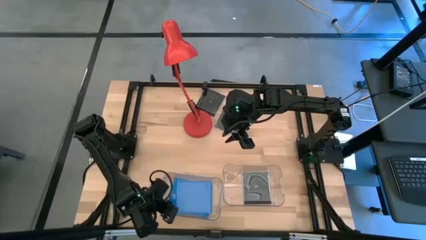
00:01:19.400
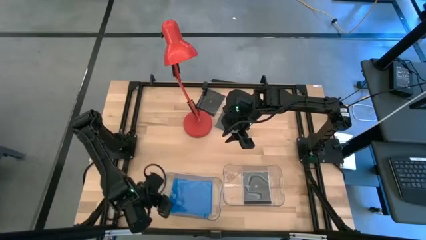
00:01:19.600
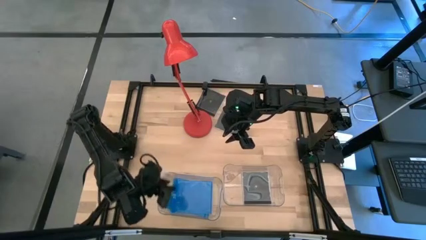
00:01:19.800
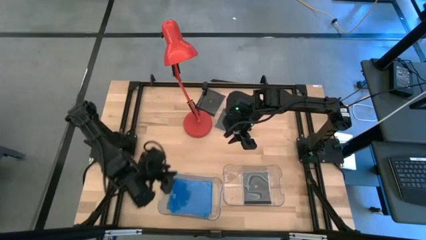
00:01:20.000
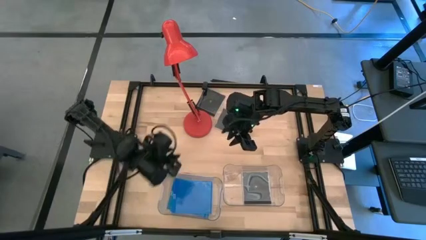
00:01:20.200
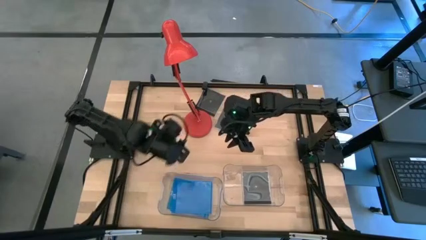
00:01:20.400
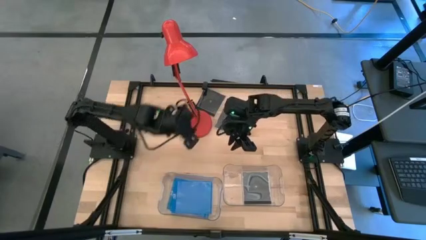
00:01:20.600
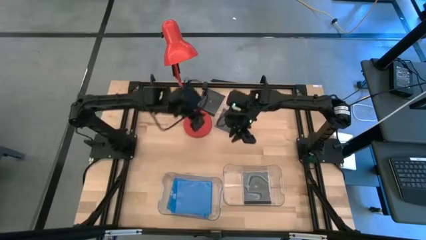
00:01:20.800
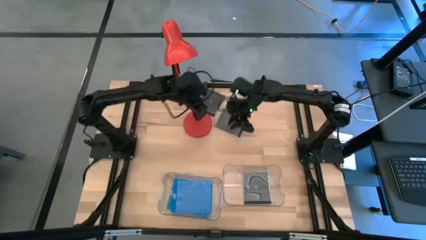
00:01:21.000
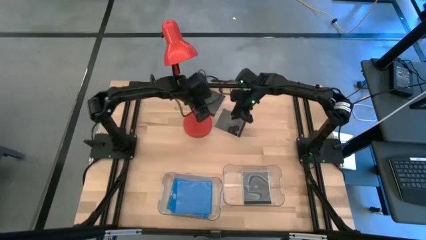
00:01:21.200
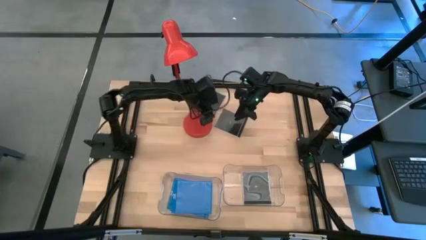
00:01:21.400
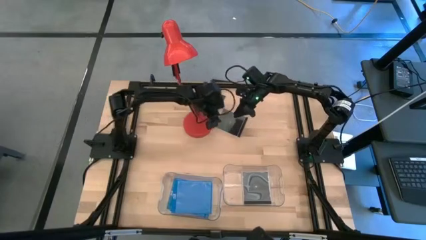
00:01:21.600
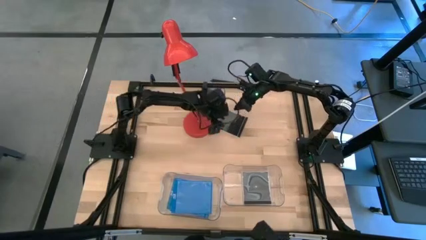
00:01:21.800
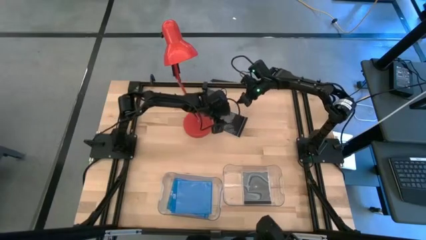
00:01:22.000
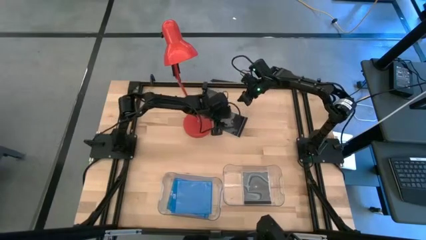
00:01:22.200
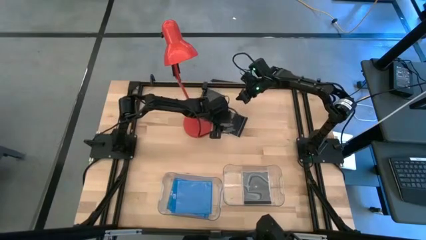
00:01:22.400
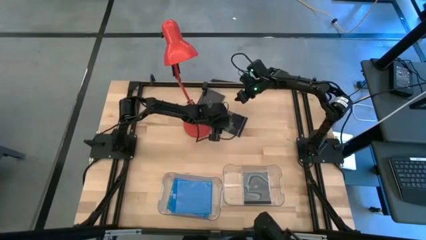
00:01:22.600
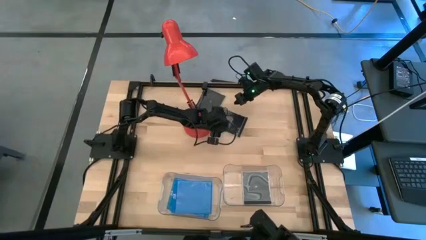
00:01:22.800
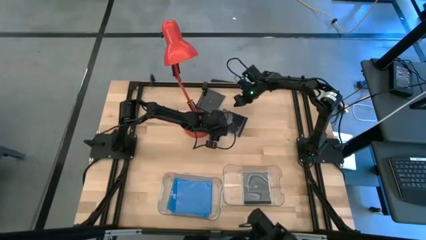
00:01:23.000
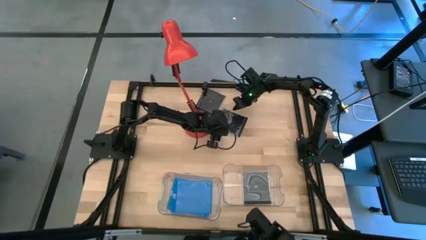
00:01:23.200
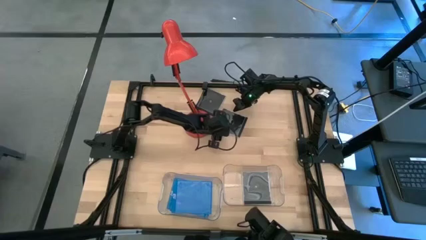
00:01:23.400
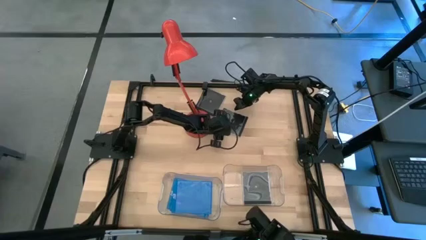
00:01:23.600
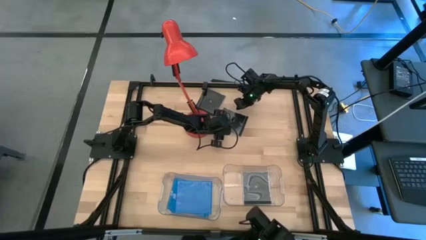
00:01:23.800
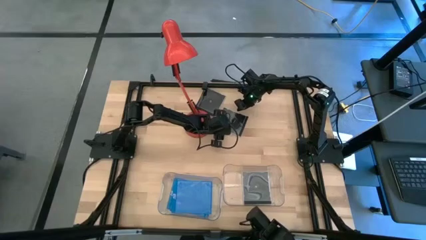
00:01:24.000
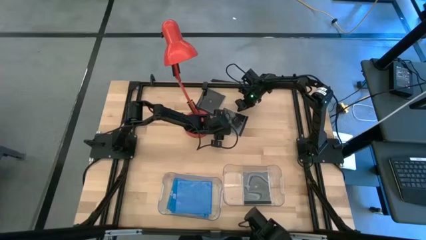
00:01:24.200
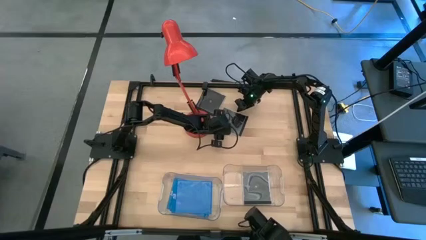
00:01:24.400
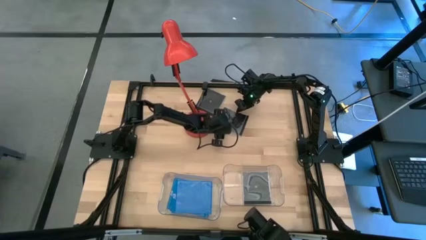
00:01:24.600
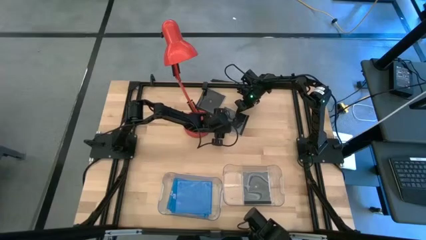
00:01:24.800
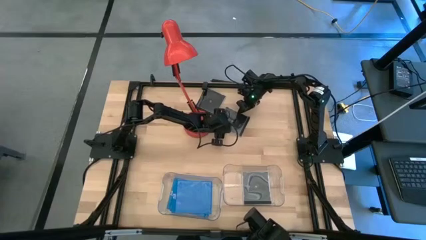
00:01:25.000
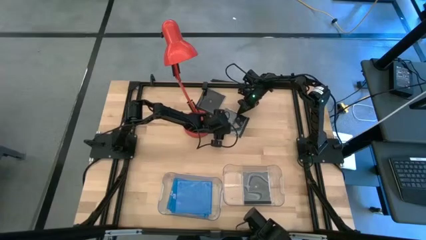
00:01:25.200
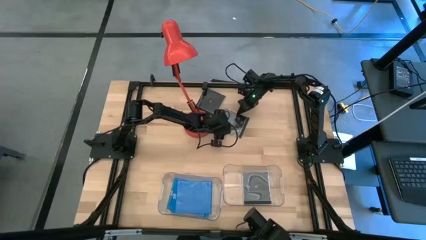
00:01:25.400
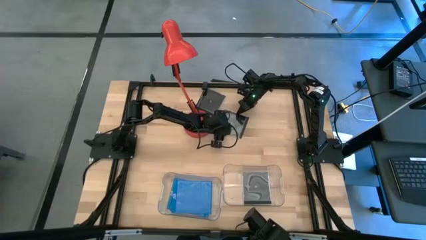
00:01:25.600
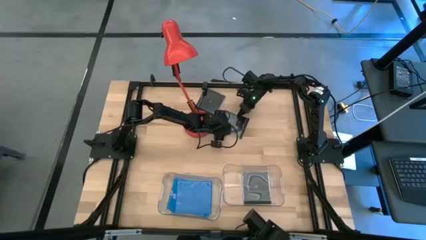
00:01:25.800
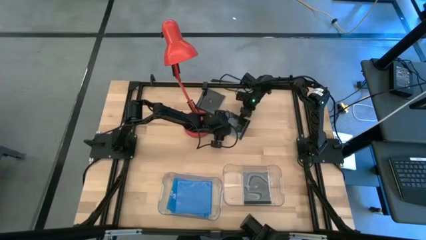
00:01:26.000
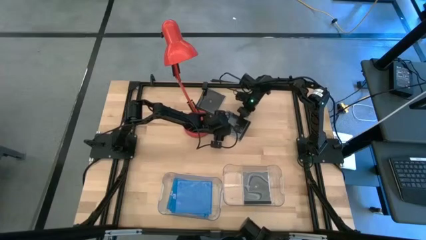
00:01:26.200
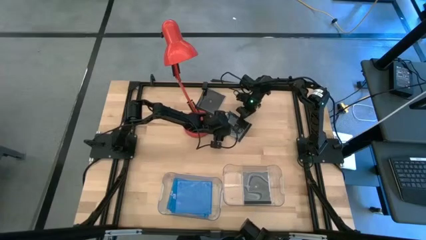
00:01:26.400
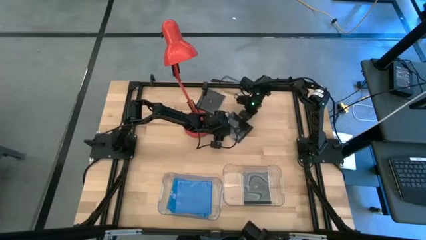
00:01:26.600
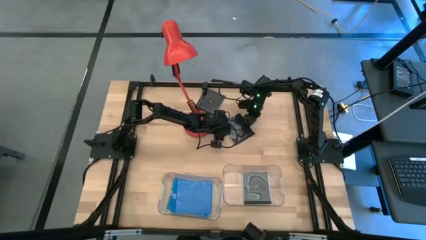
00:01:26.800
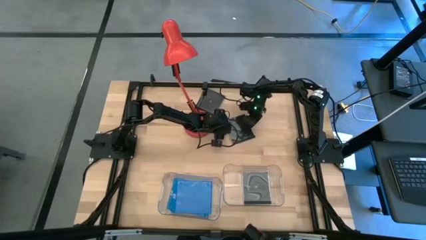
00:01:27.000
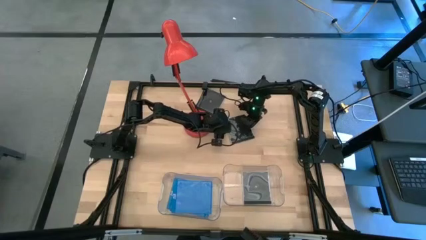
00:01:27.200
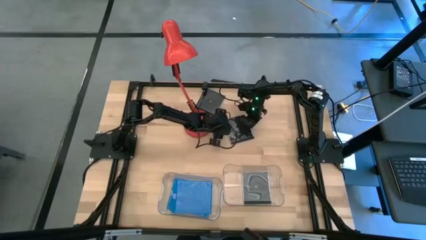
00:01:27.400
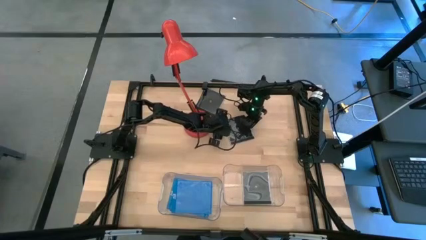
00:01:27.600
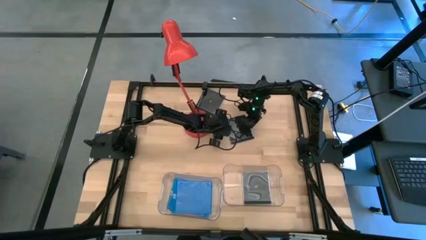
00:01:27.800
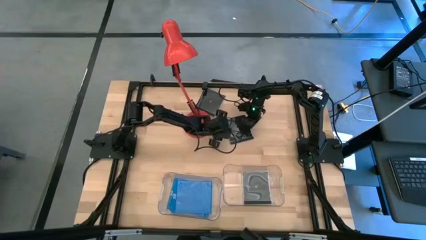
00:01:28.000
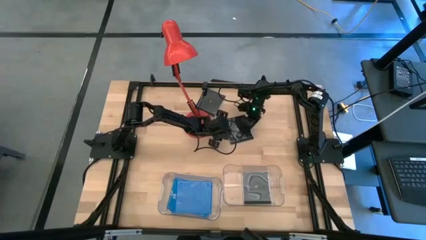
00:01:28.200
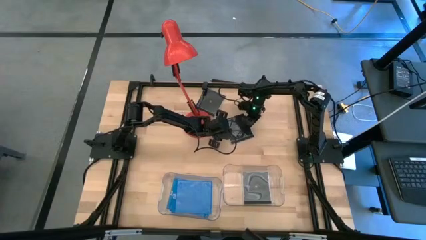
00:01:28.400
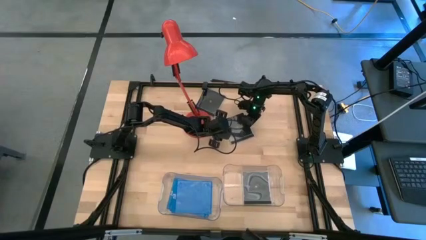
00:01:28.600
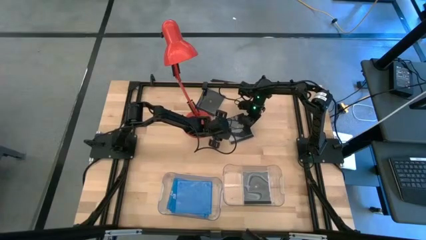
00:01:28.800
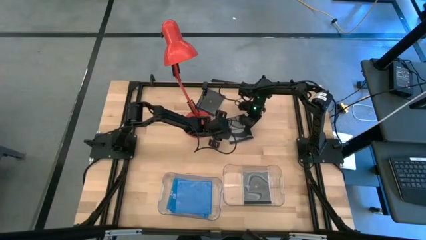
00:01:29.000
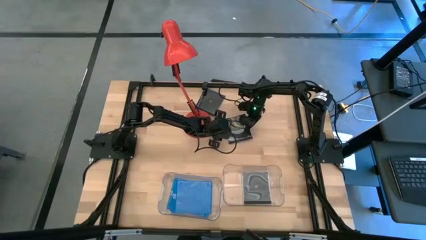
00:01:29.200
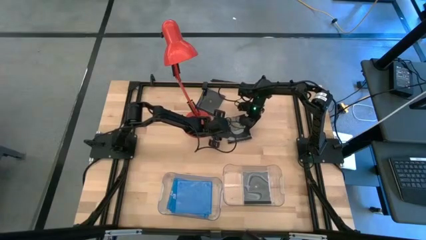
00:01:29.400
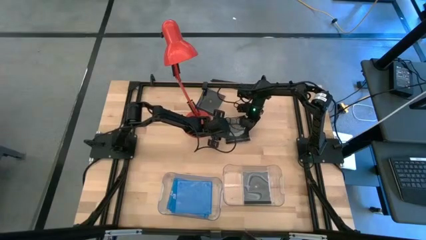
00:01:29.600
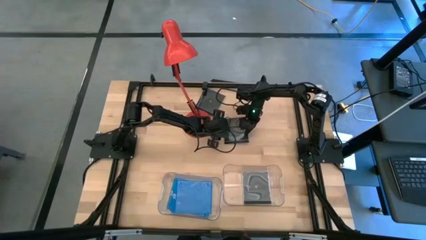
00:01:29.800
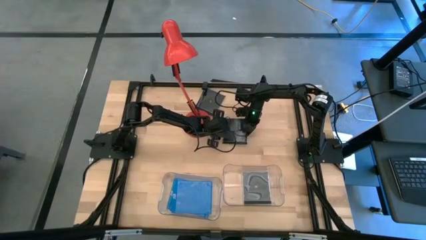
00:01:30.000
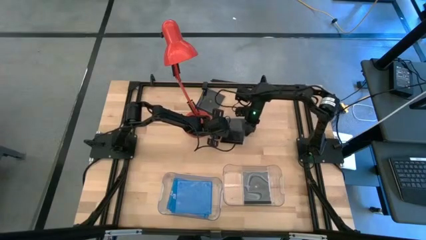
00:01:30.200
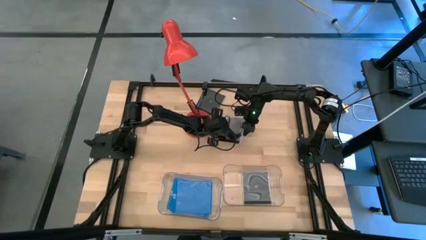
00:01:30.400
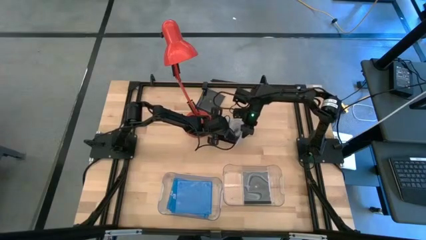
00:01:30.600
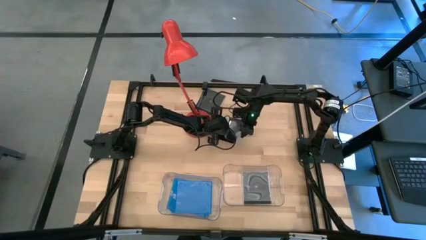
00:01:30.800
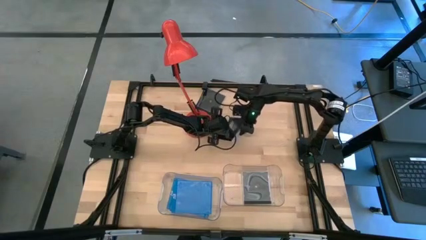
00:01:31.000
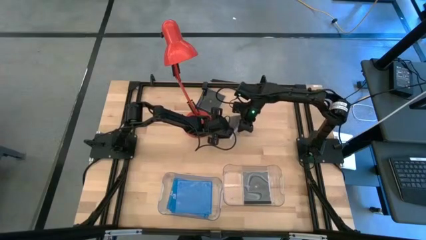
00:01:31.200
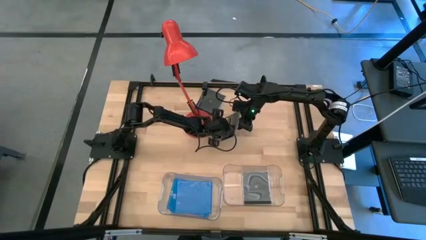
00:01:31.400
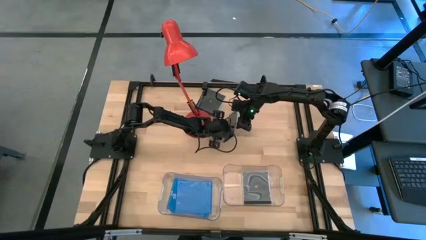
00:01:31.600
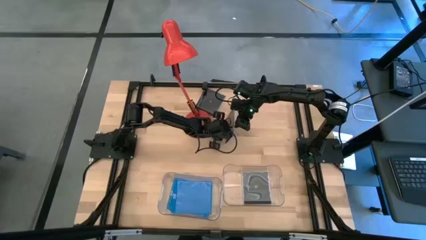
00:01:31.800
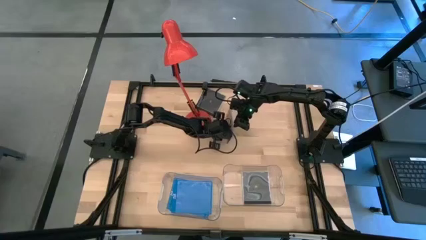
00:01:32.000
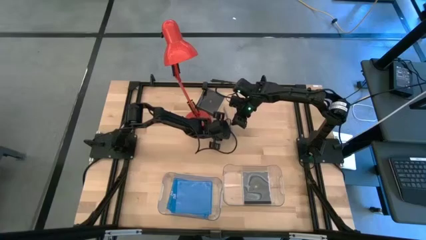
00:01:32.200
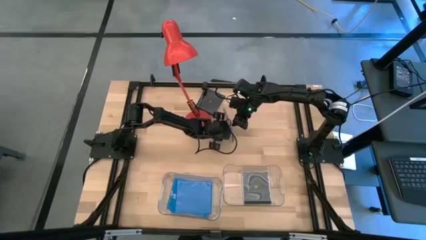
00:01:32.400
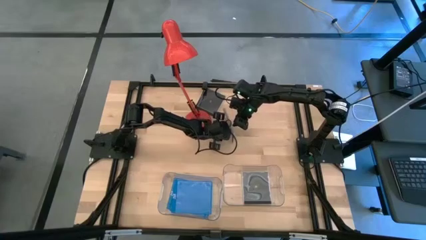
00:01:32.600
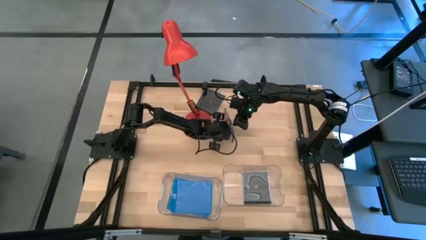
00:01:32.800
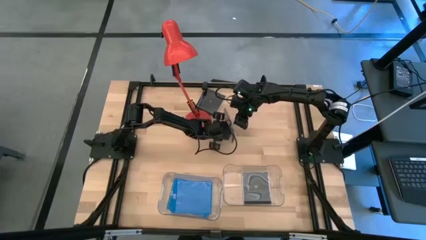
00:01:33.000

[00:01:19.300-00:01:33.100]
Task: Pick & place jewel cases by type
Put the right black cd case into the right transparent bin
